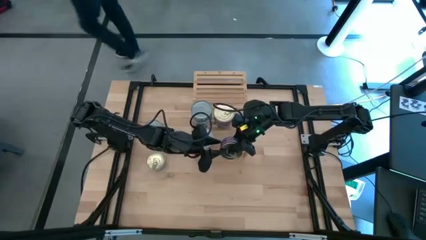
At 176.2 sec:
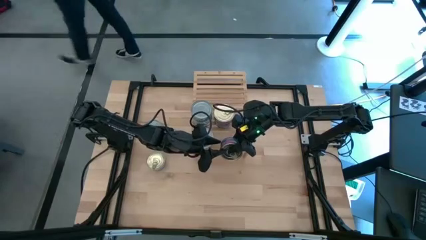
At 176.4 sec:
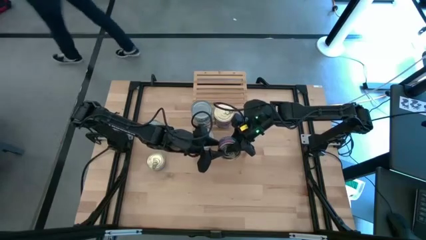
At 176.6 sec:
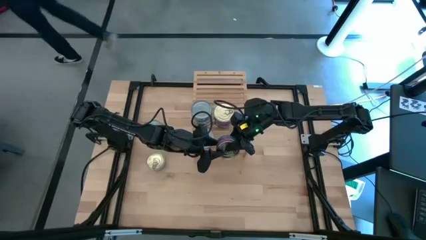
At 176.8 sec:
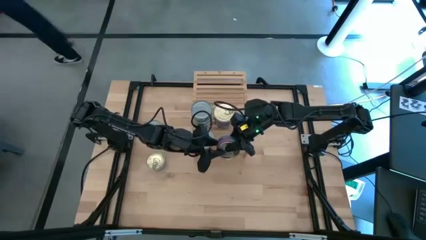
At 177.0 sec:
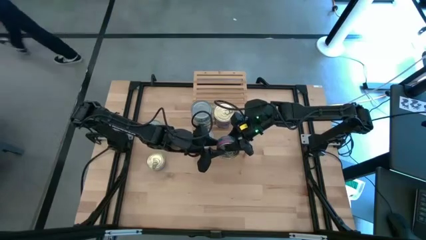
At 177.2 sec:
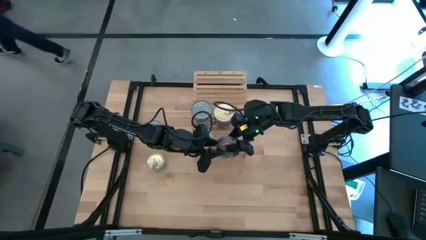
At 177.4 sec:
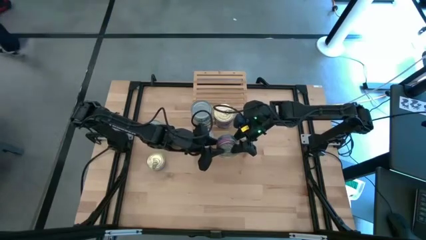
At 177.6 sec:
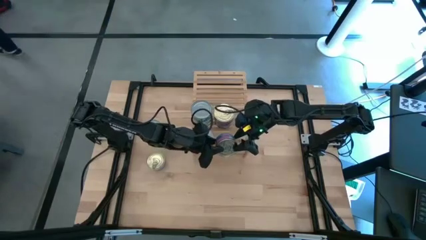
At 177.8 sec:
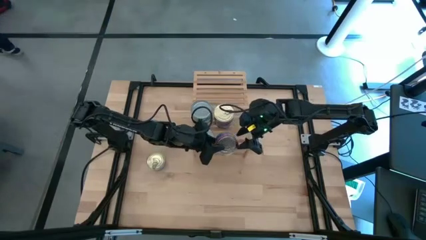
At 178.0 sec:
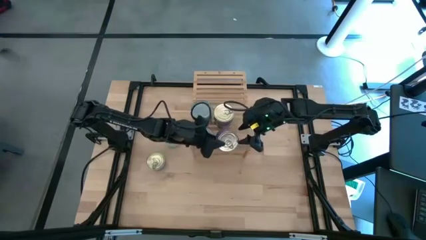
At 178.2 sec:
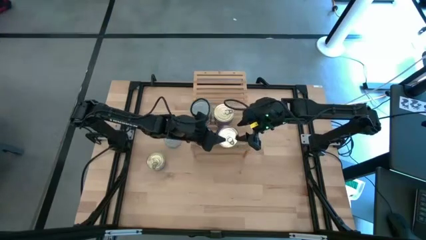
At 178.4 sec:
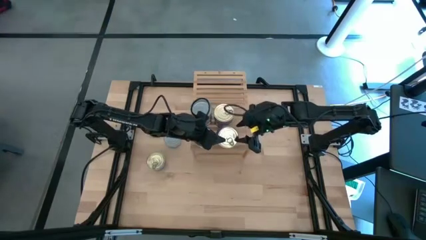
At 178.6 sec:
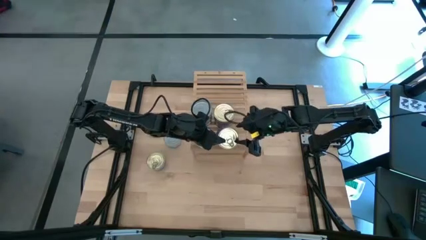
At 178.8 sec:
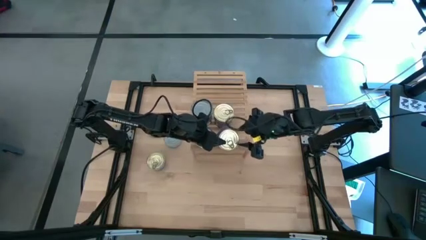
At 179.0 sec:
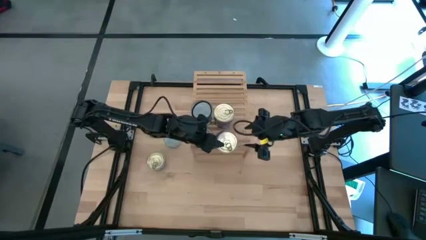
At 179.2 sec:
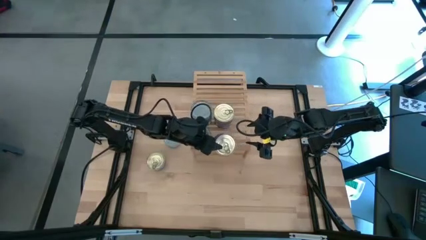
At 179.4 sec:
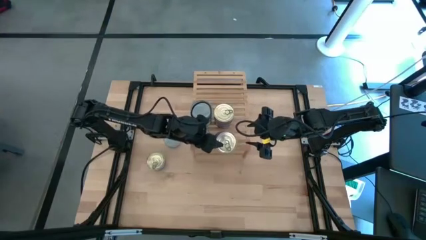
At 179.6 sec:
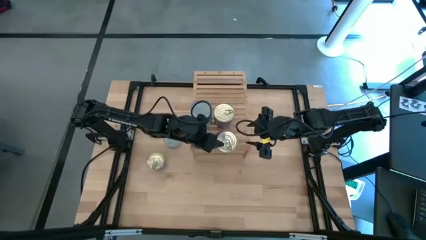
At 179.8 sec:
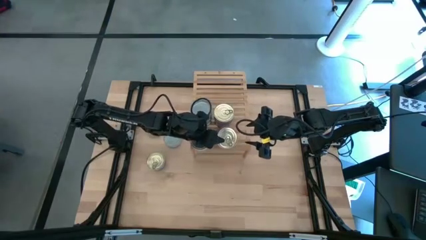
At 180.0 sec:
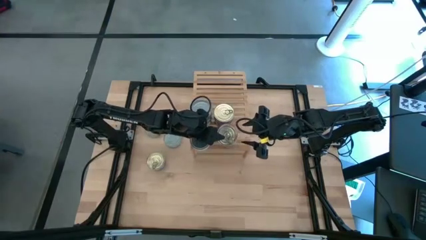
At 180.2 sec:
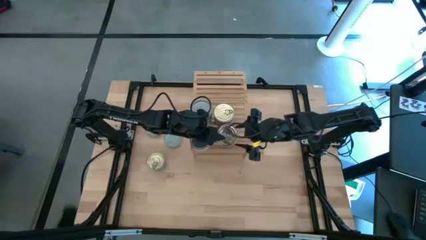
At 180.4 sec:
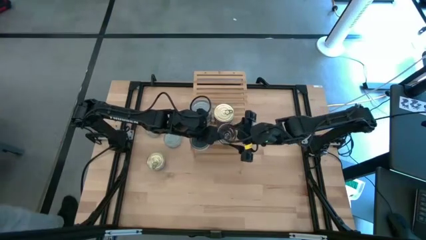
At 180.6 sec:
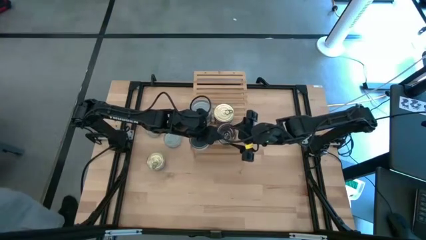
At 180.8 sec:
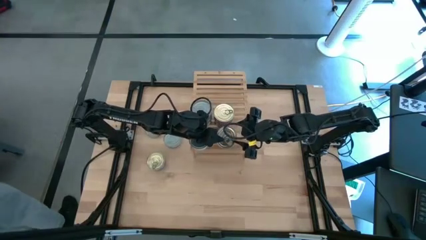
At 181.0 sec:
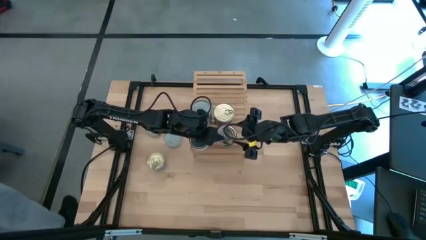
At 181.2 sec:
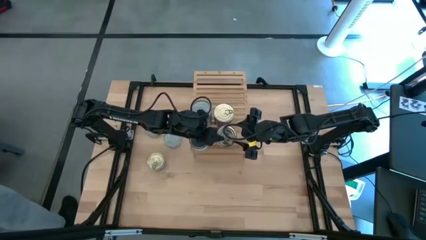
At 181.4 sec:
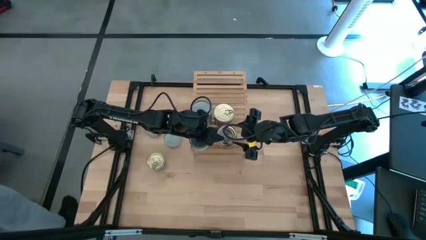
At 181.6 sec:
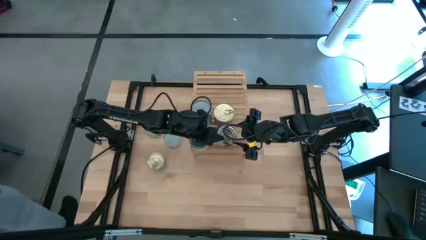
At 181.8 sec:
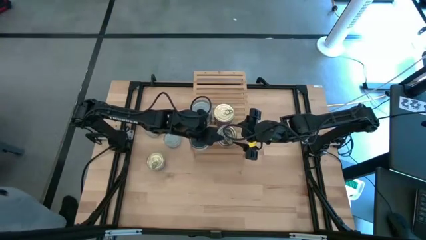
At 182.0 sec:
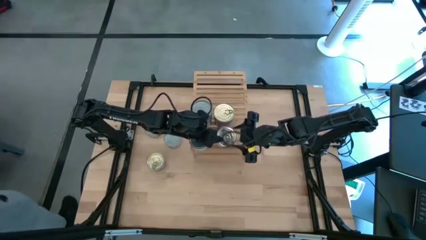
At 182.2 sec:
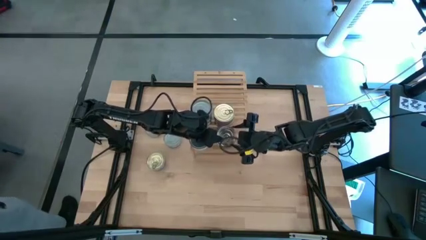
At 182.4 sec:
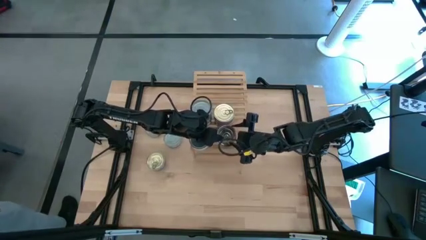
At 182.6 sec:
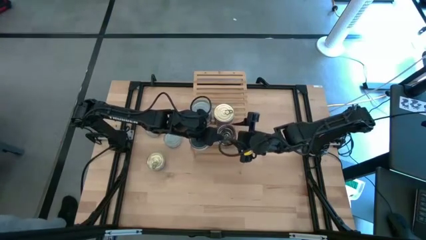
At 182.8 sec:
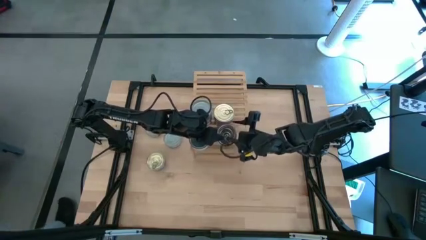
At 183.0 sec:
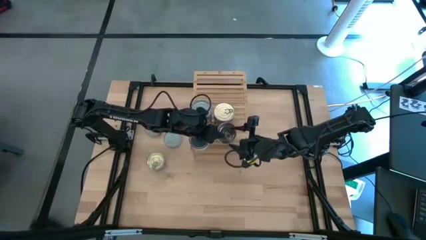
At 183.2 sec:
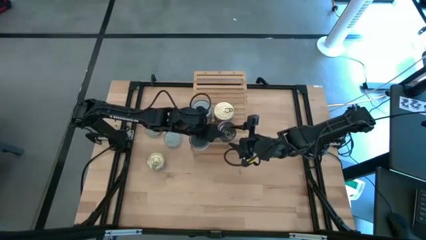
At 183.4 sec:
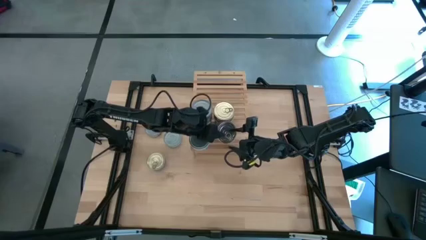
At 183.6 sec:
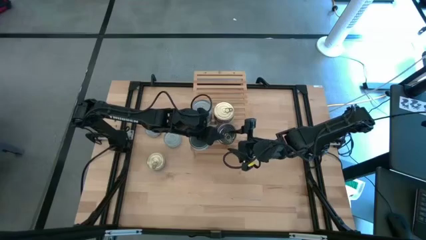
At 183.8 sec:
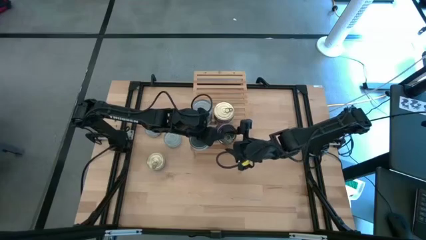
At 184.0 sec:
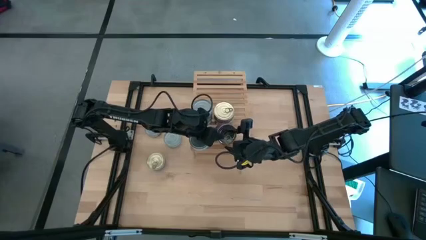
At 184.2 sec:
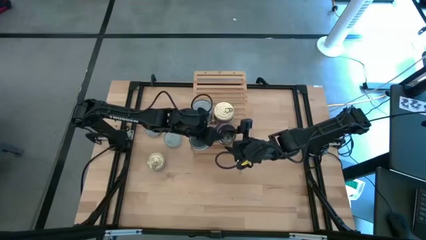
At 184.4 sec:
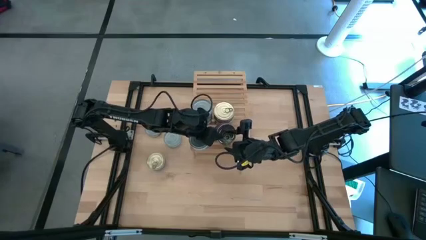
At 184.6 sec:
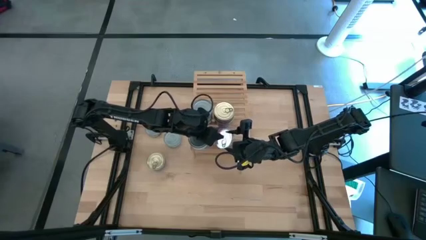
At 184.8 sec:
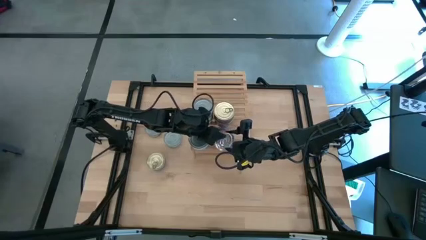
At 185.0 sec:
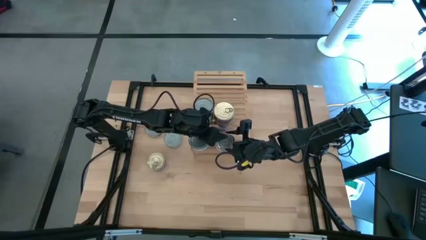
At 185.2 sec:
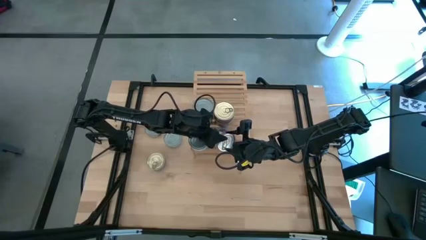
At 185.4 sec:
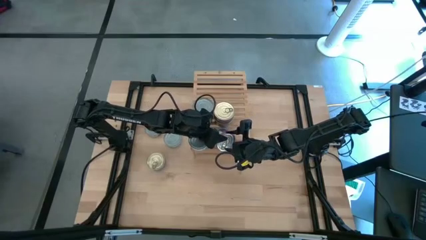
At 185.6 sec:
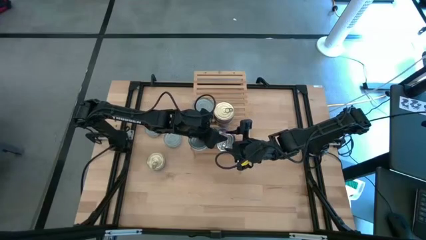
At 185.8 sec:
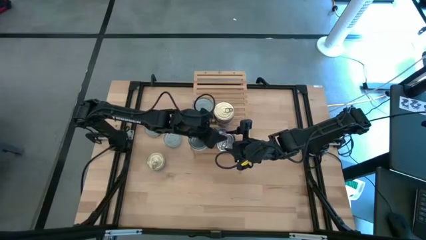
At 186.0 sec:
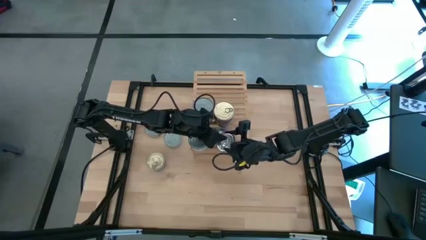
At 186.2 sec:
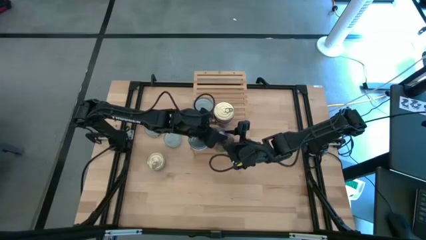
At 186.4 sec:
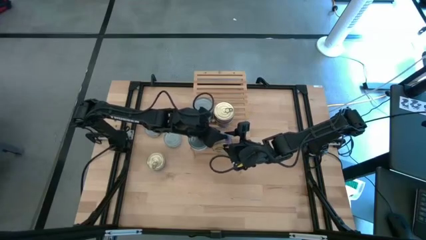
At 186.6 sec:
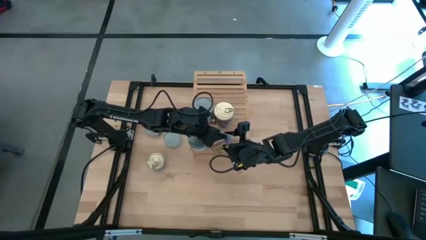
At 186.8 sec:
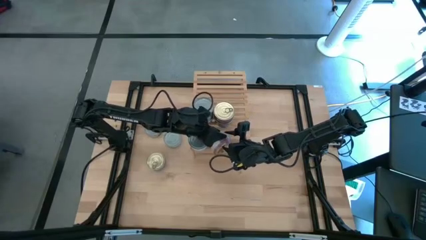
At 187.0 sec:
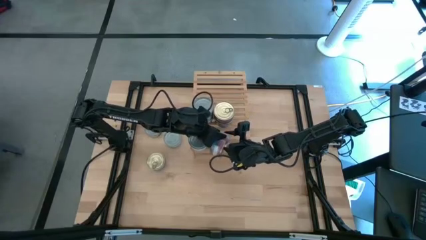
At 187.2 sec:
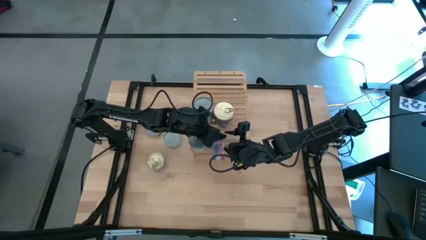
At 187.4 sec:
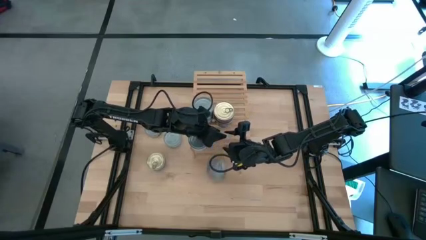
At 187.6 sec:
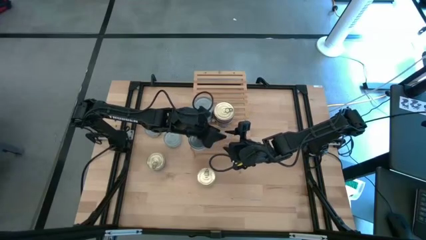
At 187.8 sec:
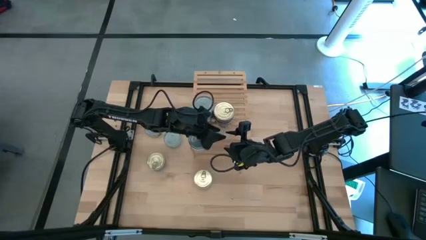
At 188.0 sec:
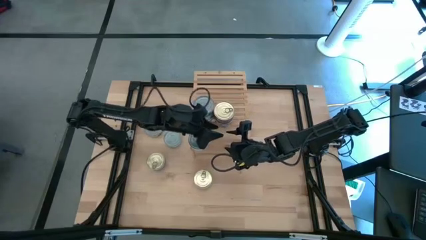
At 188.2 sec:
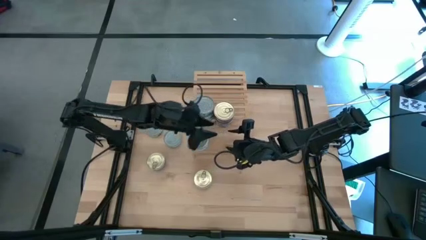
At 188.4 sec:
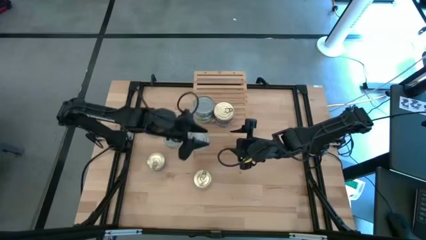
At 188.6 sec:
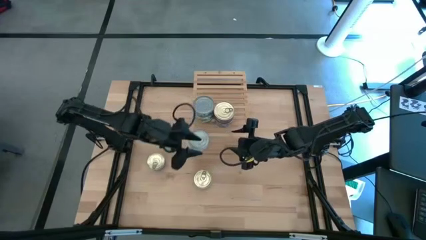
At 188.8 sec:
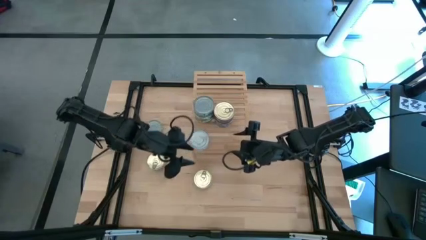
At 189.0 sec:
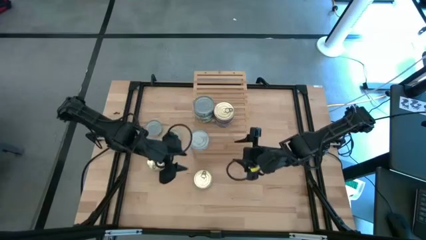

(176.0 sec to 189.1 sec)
Task: Stack canned seafood by type on shelf
Put the blue tuna can on the shelf

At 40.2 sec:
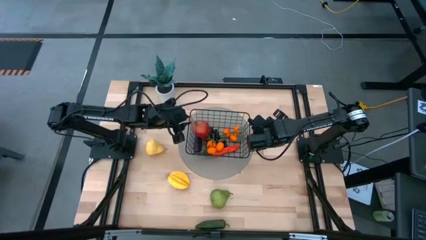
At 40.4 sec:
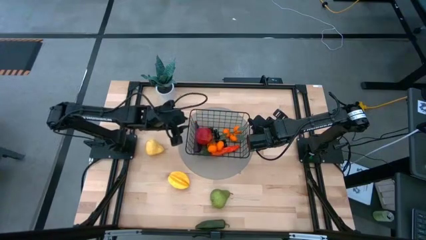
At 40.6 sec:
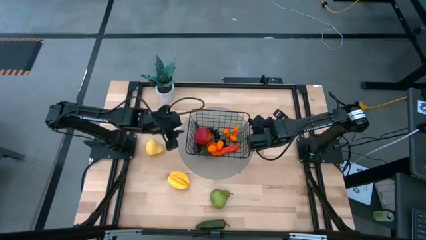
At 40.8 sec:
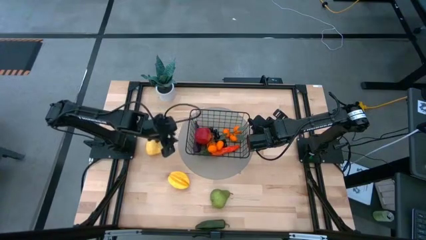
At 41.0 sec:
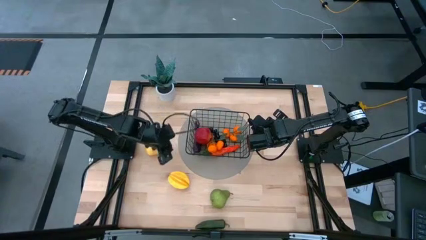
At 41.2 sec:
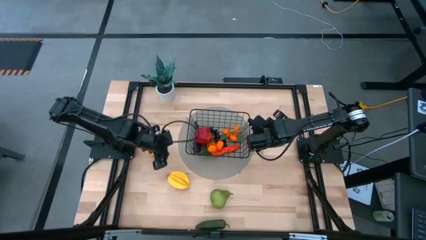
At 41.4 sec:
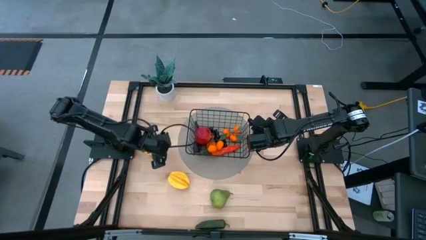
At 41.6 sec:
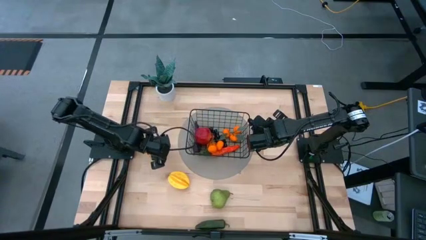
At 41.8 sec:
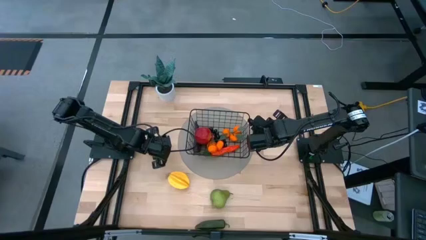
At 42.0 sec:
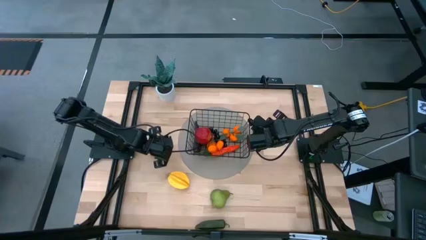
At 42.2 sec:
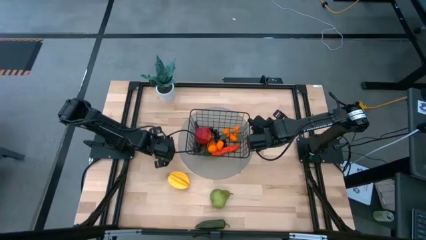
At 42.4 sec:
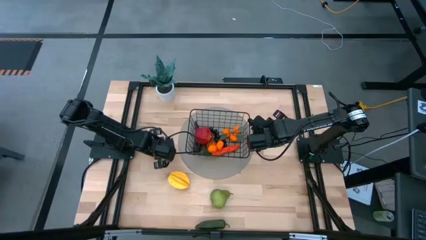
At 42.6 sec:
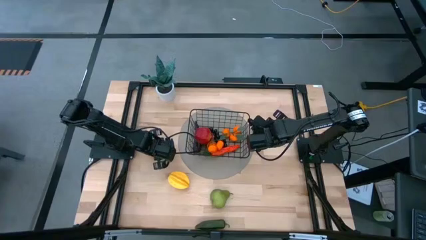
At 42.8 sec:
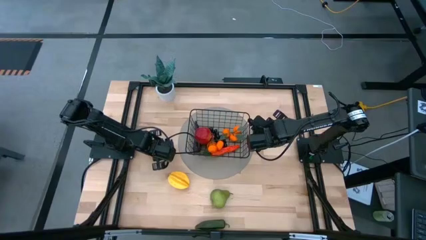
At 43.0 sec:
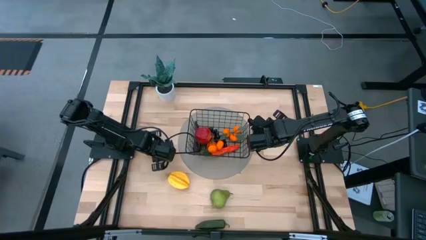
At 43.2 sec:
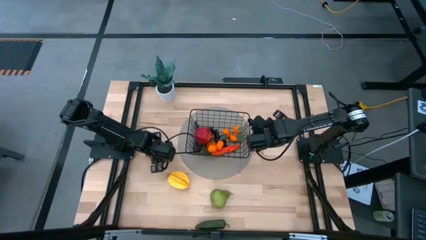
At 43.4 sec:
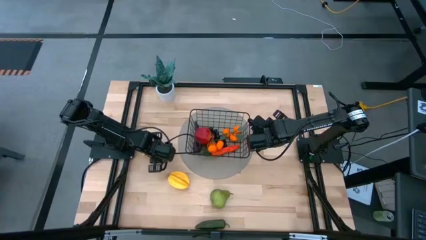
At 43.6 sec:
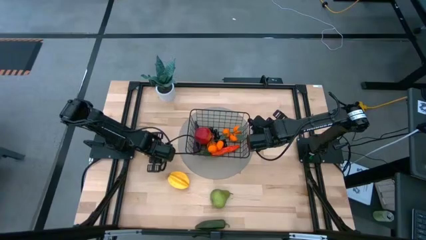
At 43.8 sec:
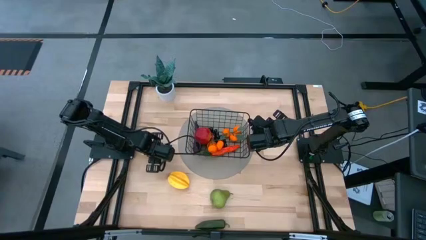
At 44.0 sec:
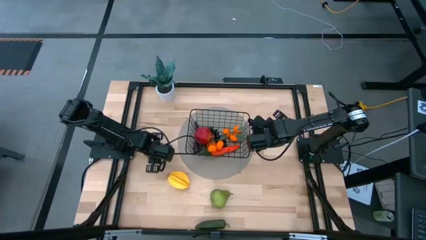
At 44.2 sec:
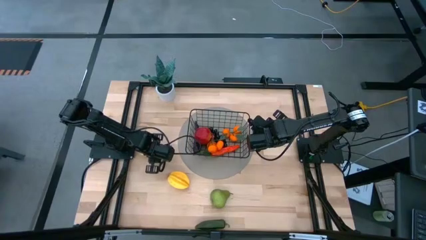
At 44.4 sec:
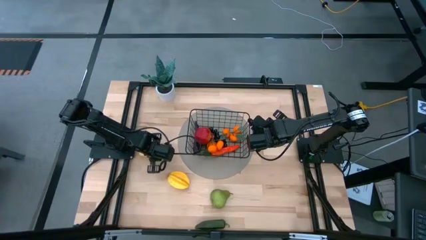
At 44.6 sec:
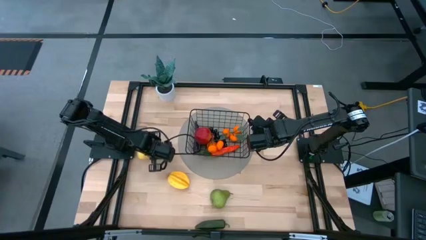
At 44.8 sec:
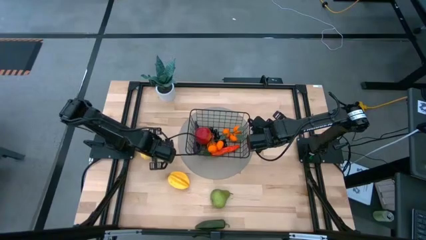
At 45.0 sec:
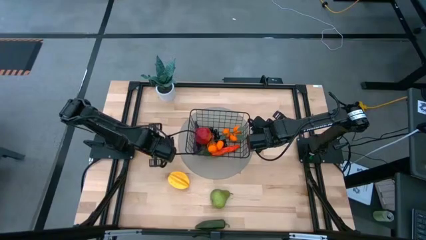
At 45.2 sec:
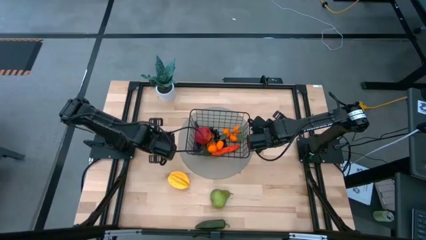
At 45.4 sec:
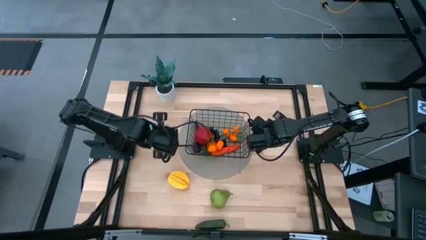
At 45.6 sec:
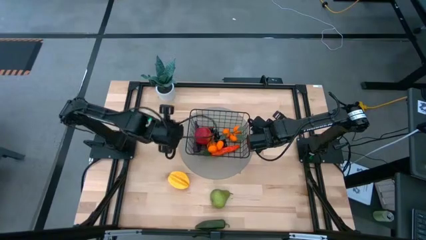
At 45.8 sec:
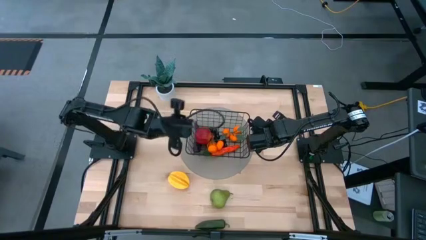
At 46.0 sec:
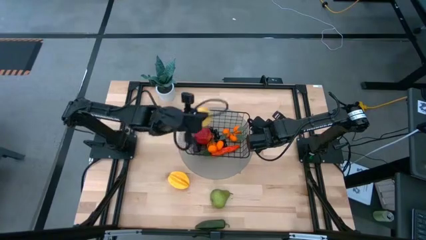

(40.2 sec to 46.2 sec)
Task: Build produce basket
Put the yellow pear into the black wire basket
